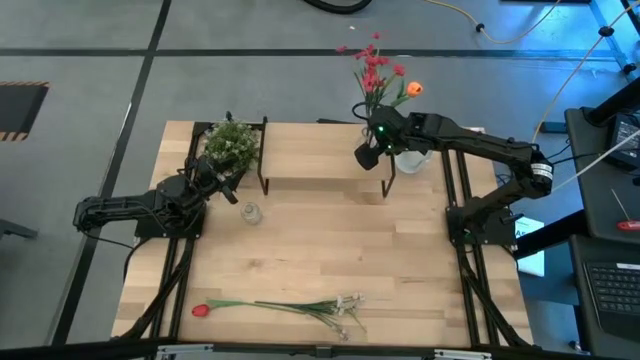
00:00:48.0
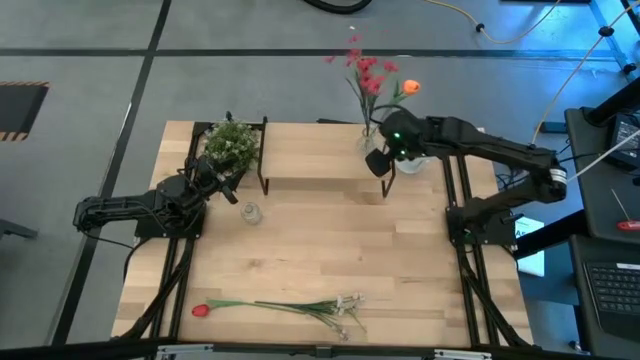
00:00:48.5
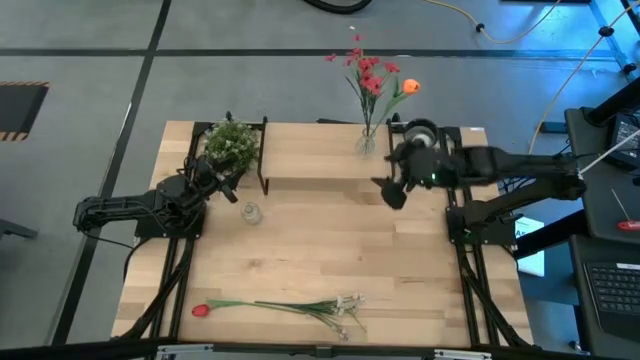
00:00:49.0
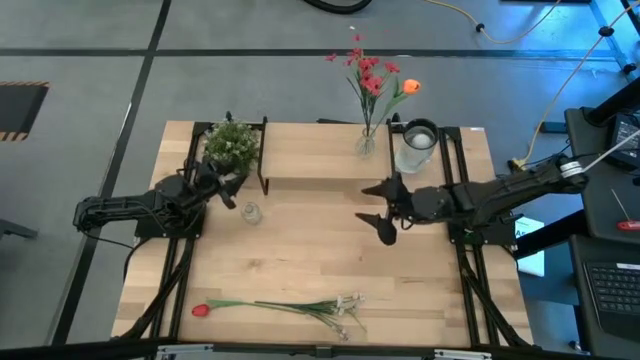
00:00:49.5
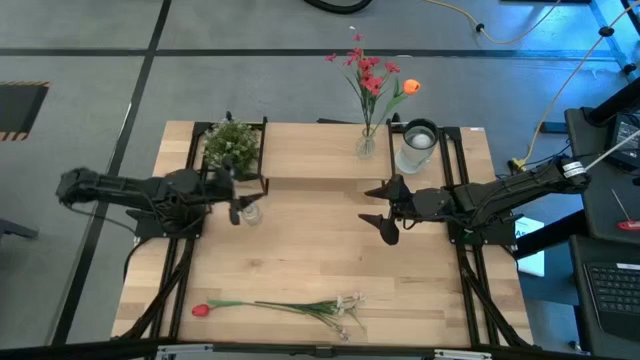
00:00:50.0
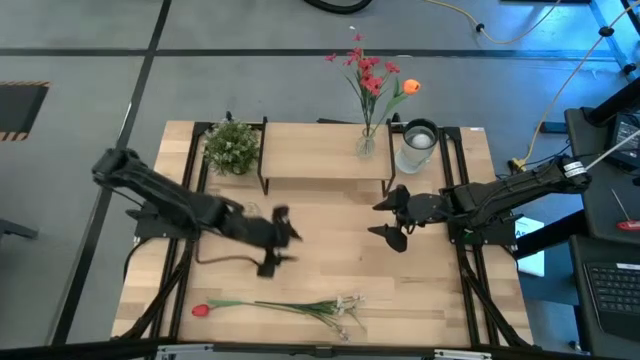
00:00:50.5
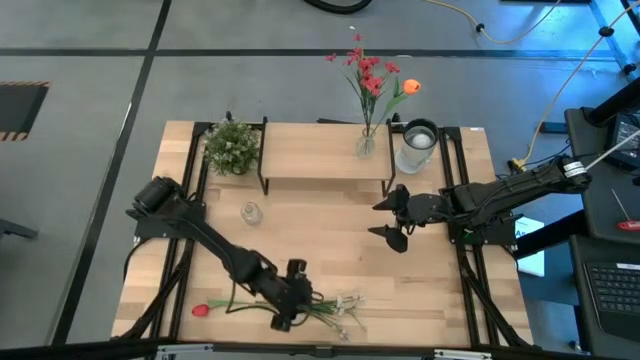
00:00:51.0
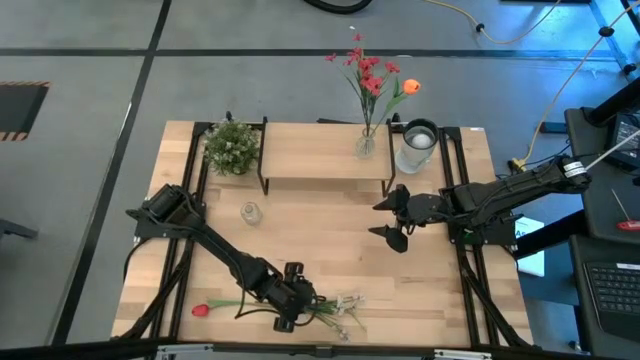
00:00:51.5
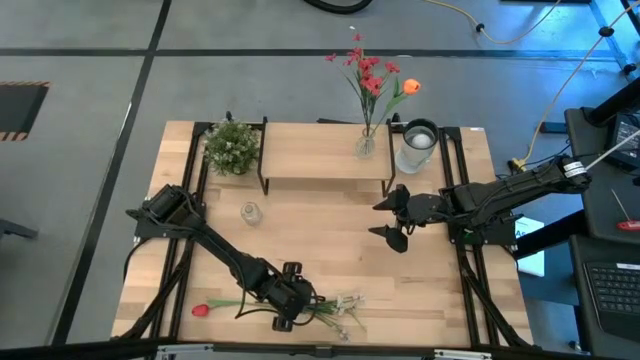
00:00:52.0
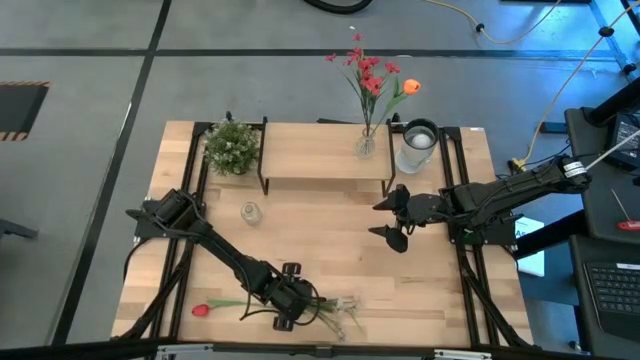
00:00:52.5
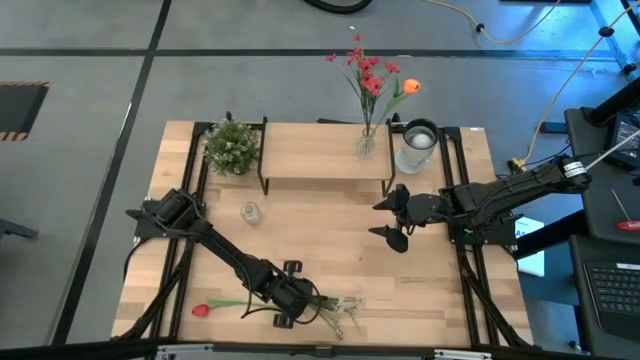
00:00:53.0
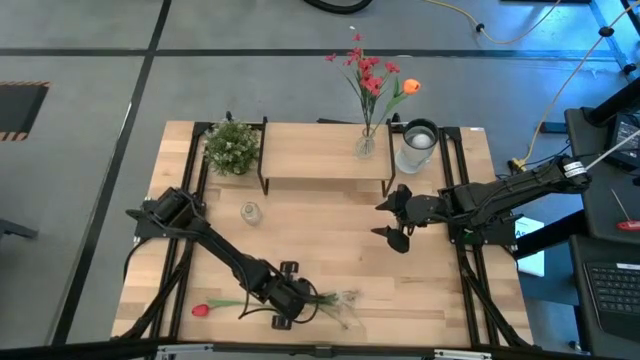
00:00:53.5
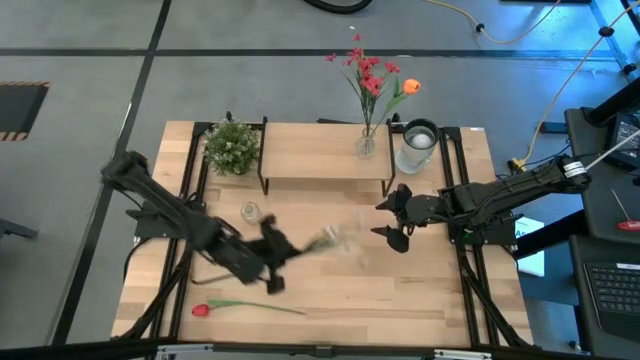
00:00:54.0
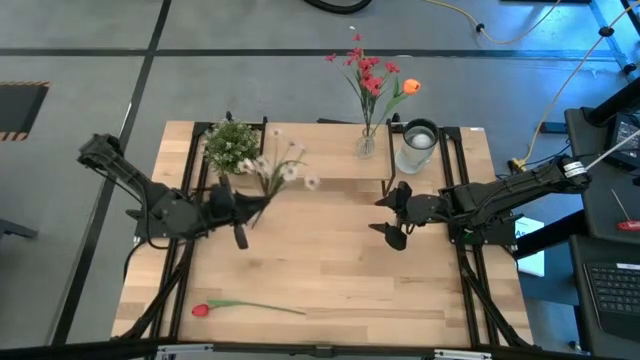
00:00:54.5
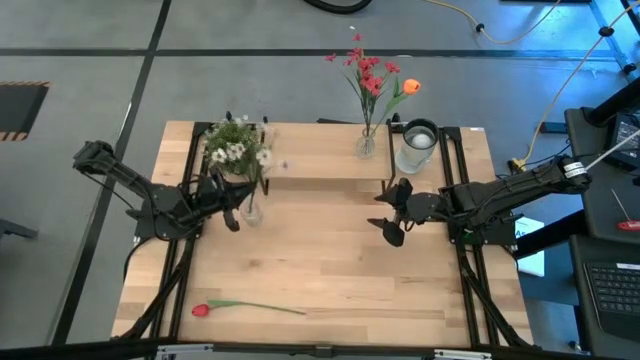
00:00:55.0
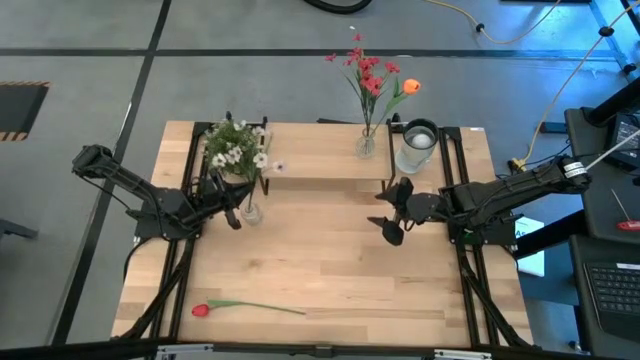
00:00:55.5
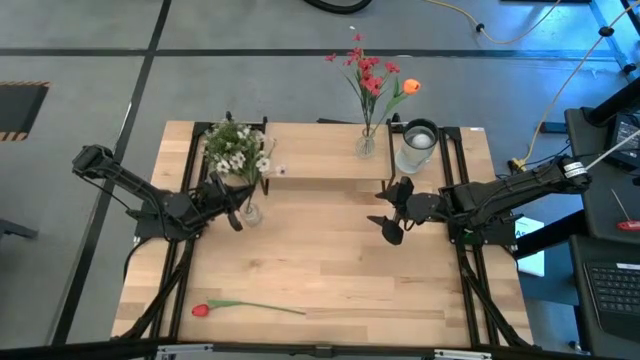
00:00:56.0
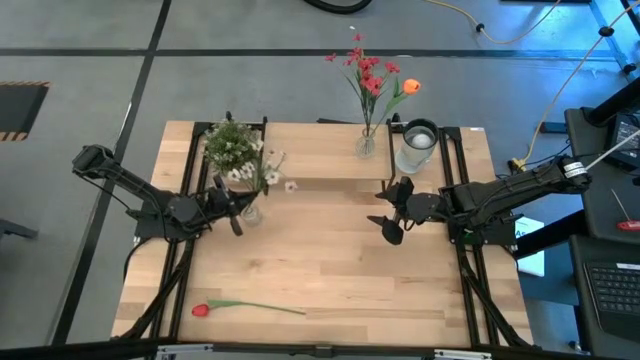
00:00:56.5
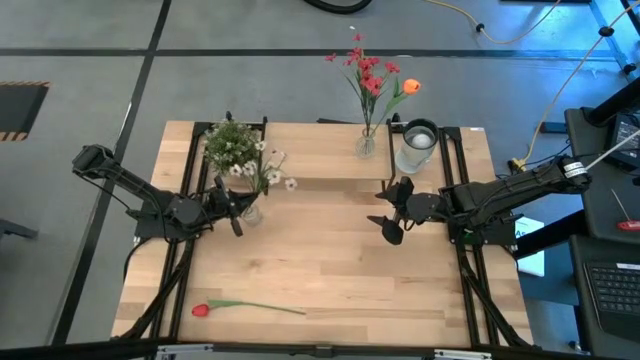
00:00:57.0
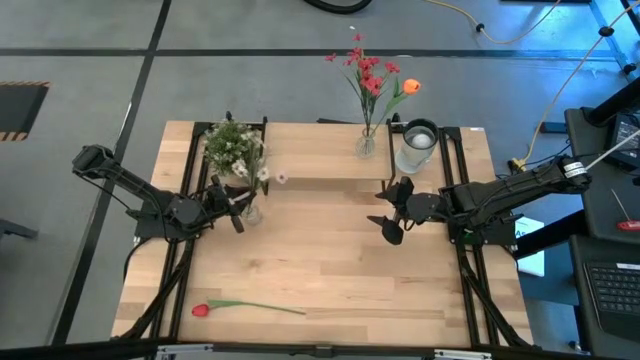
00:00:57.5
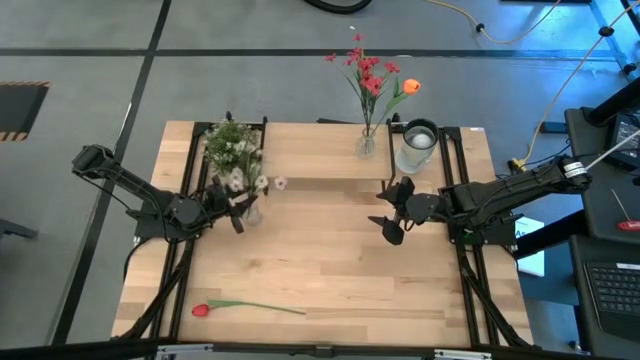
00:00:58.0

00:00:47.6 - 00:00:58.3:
Task: Pick and place flowers into a vace then onto a shelf
Put the white flowers into the transparent vase

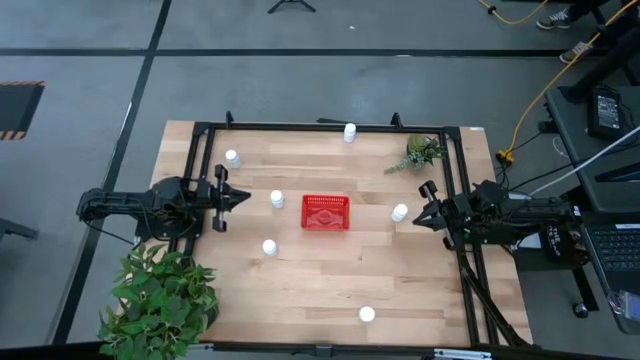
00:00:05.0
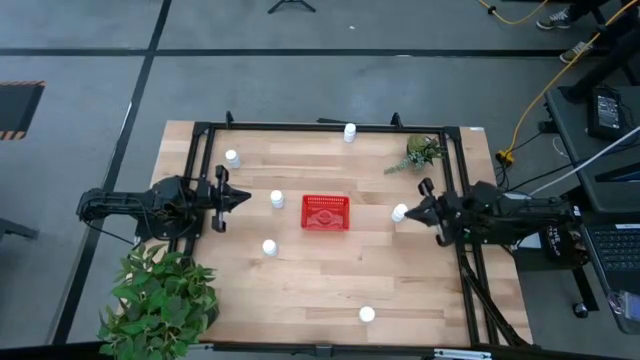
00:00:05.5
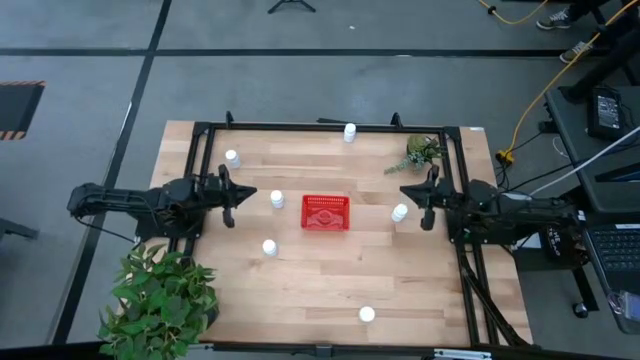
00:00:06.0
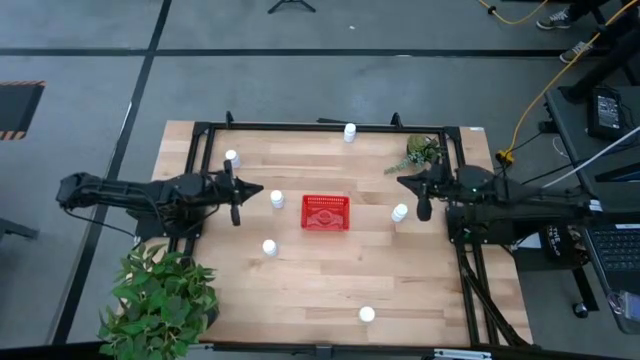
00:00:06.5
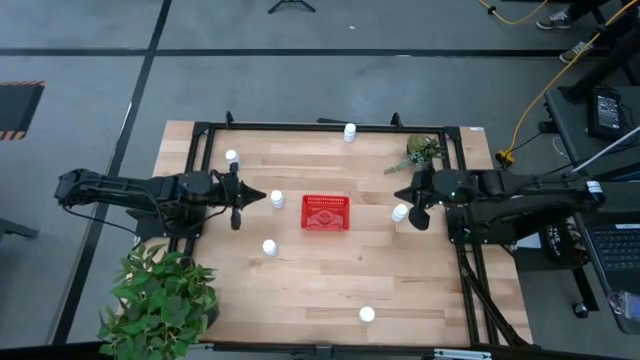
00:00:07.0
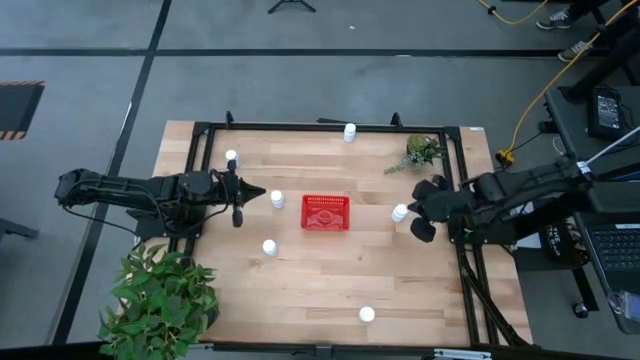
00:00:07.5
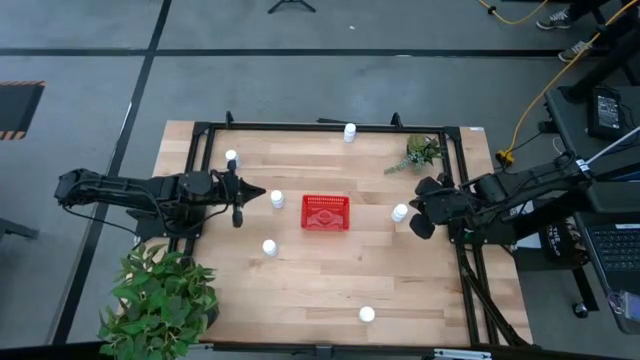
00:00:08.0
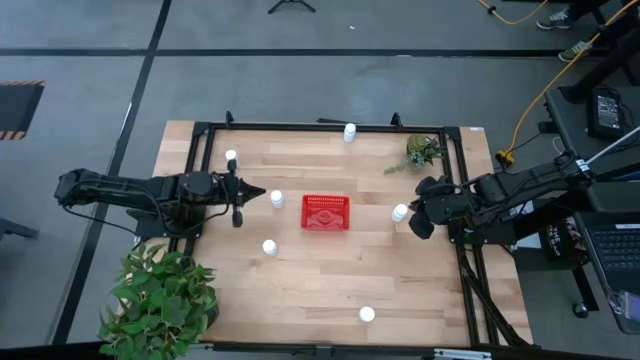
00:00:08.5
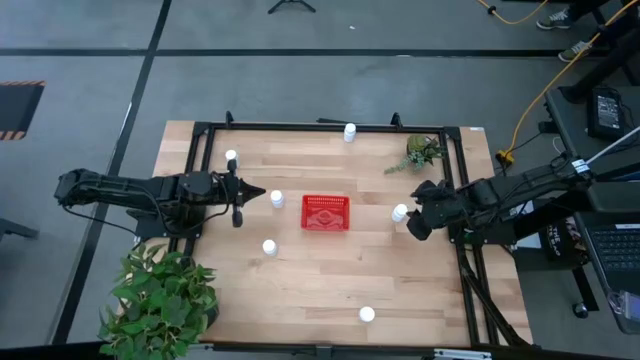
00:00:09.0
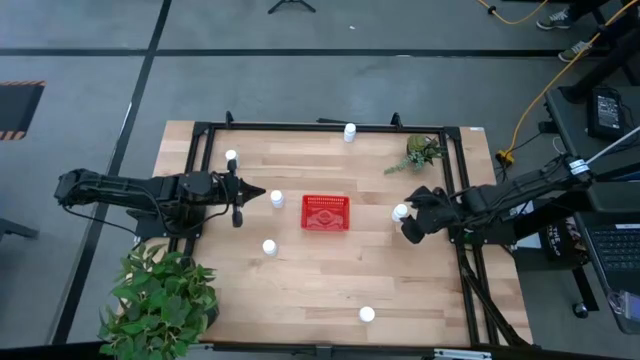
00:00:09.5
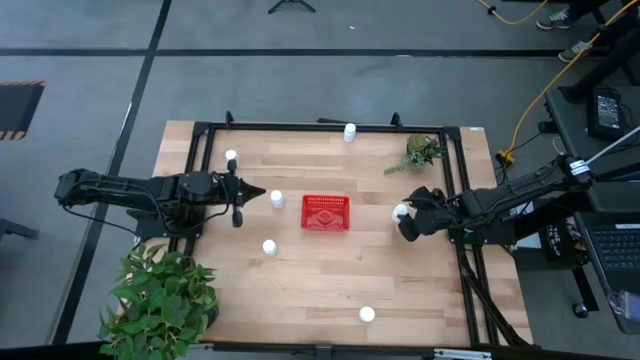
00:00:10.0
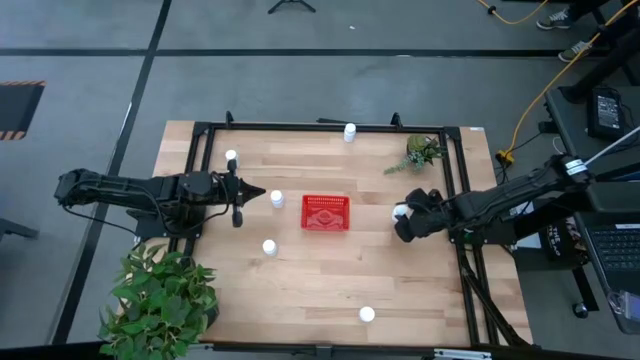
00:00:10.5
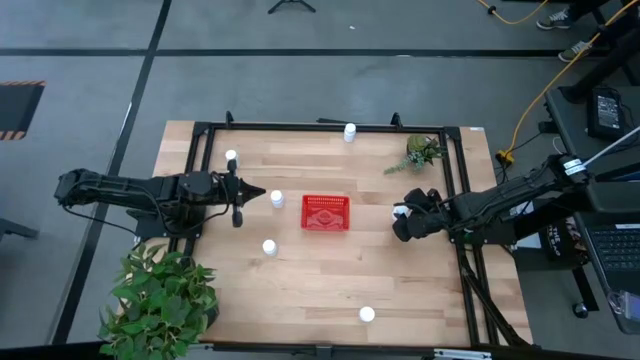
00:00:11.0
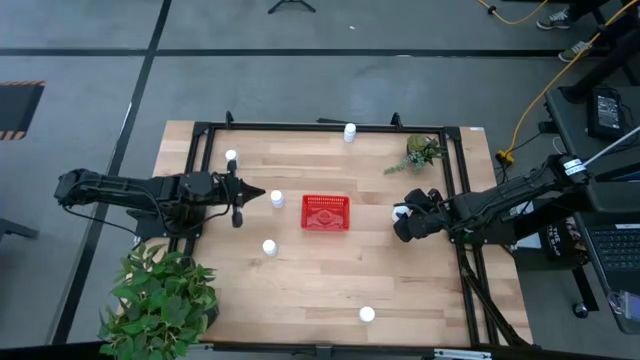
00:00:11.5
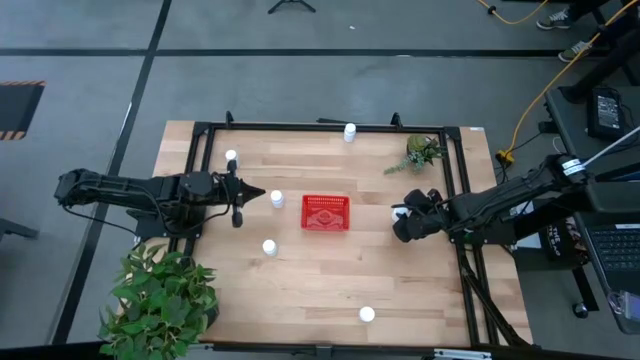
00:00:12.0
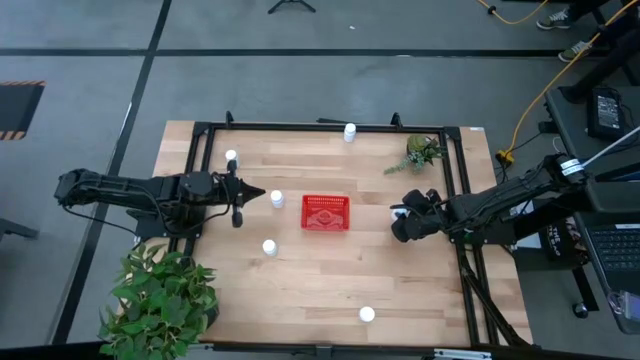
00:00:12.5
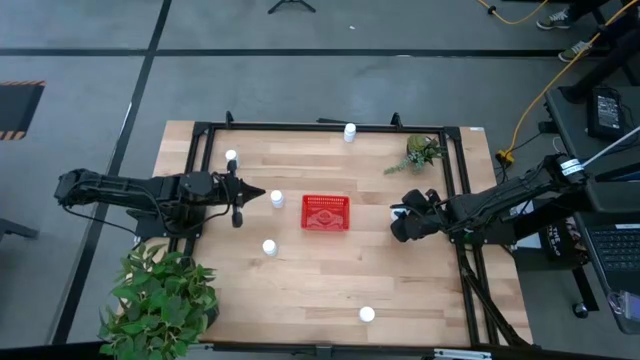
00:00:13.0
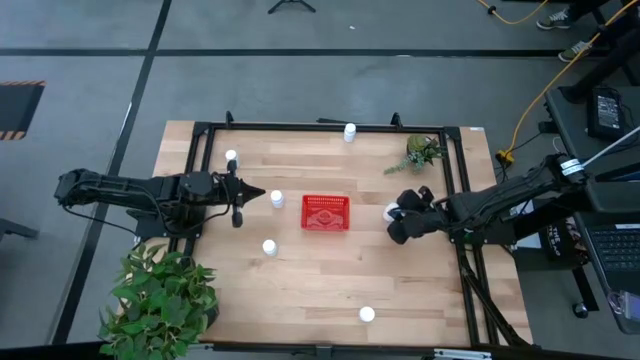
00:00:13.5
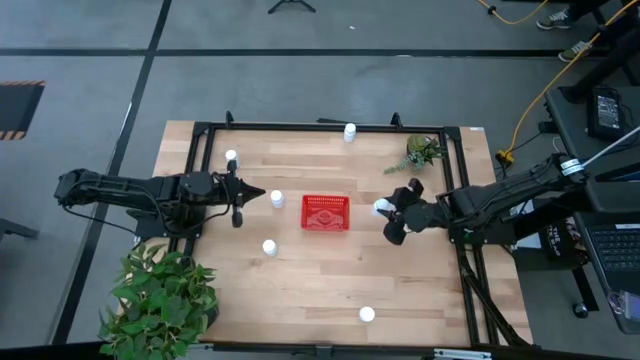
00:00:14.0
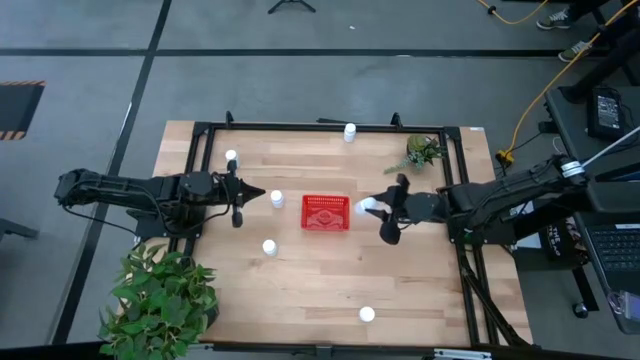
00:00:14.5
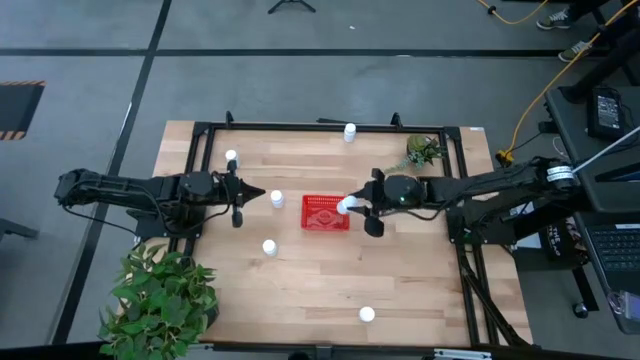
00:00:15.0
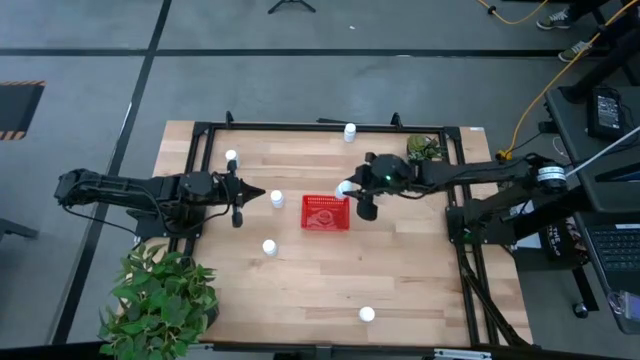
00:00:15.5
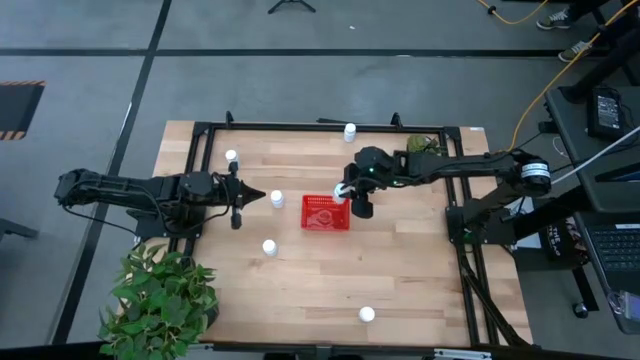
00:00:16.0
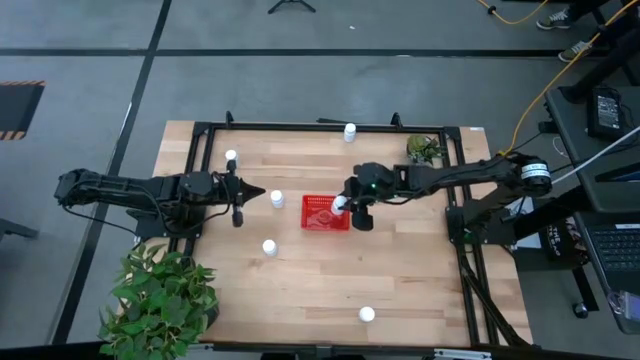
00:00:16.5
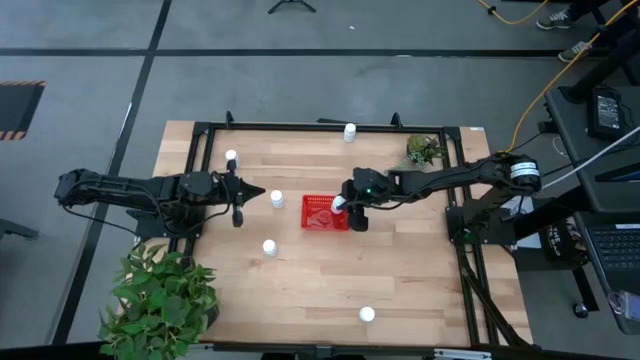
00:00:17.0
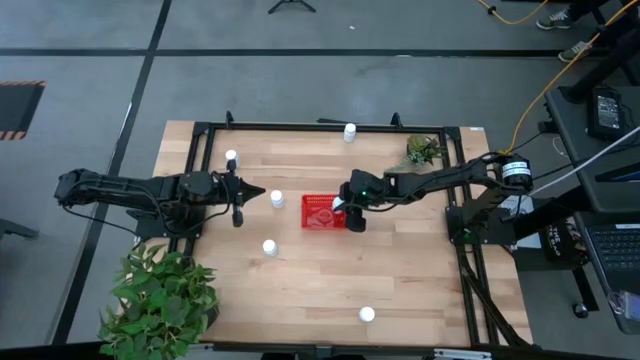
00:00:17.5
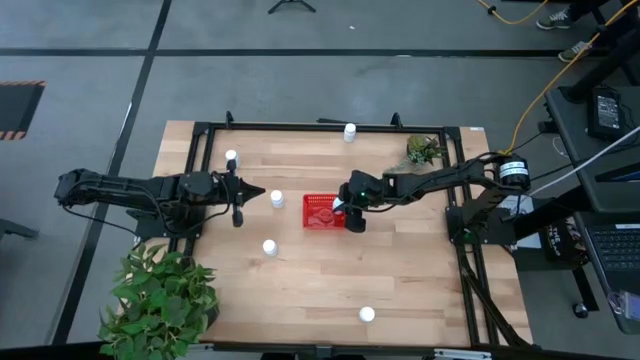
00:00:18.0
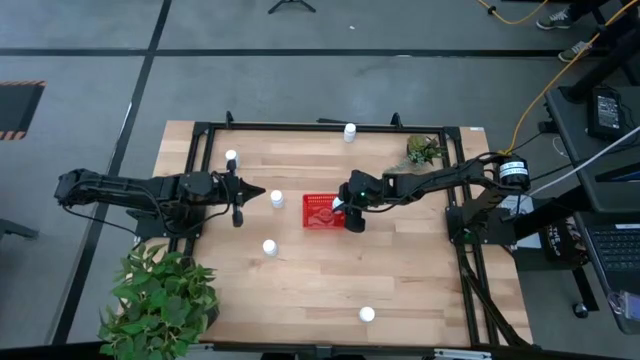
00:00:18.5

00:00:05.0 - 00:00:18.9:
Task: Pick and place pill bottles into a basket
Put the white pill bottle into the red basket
